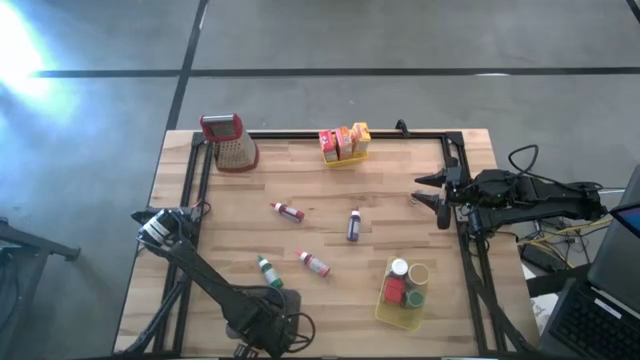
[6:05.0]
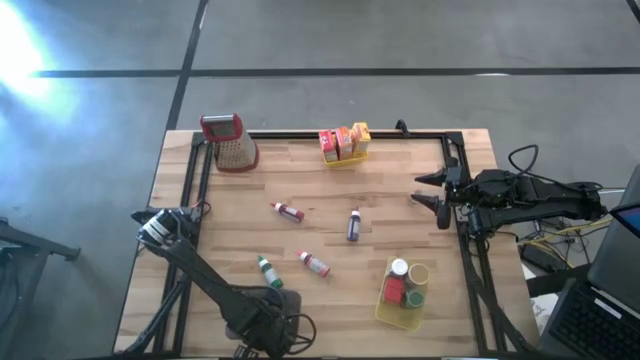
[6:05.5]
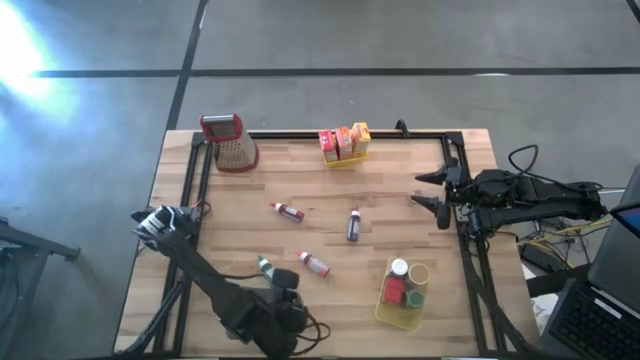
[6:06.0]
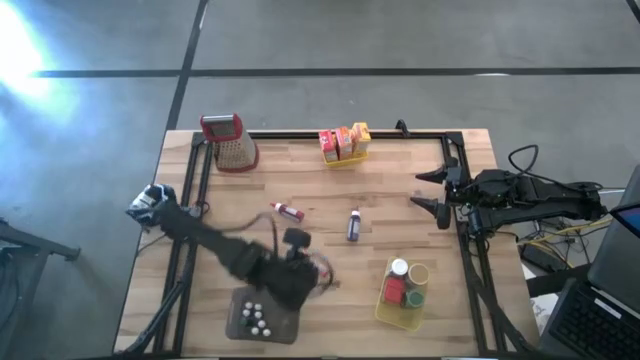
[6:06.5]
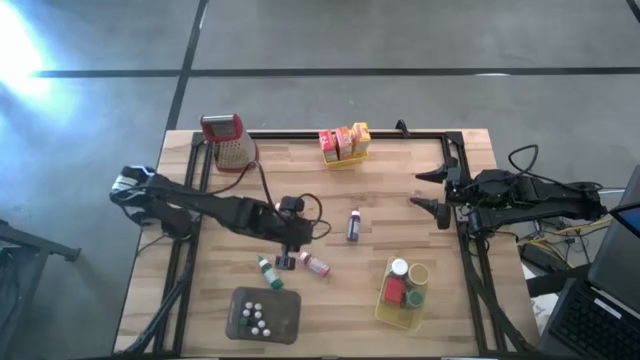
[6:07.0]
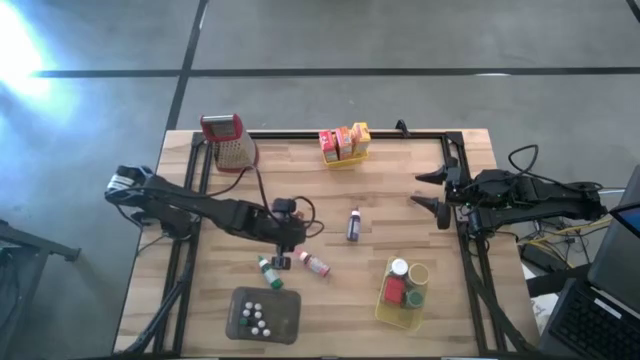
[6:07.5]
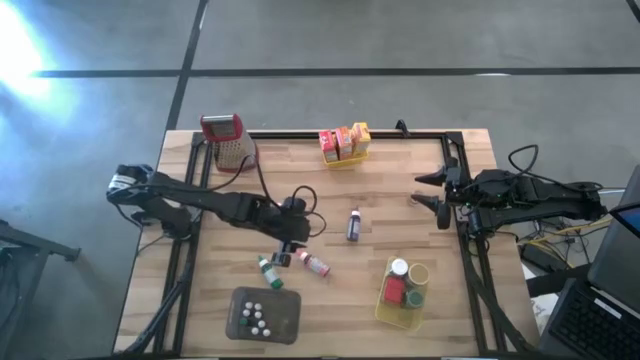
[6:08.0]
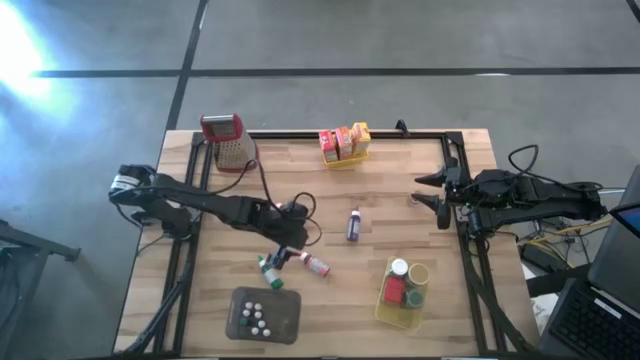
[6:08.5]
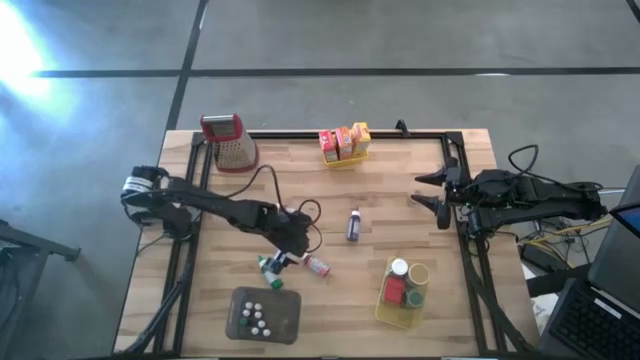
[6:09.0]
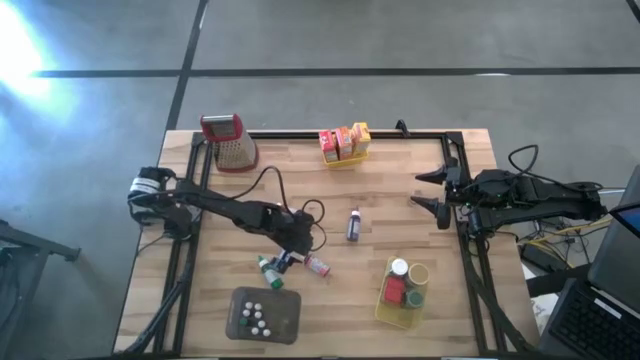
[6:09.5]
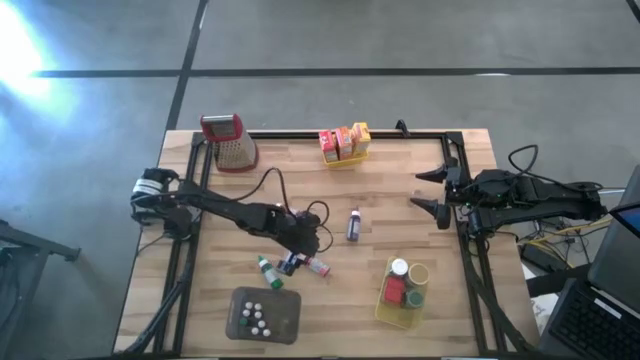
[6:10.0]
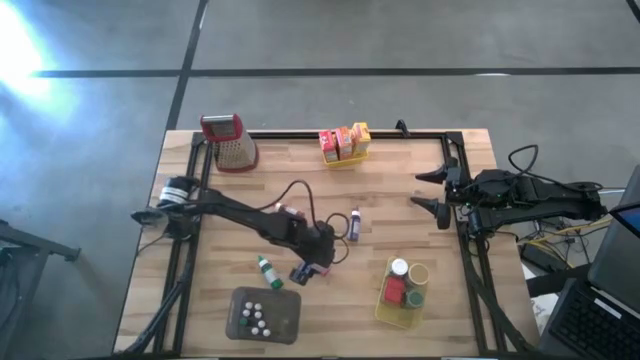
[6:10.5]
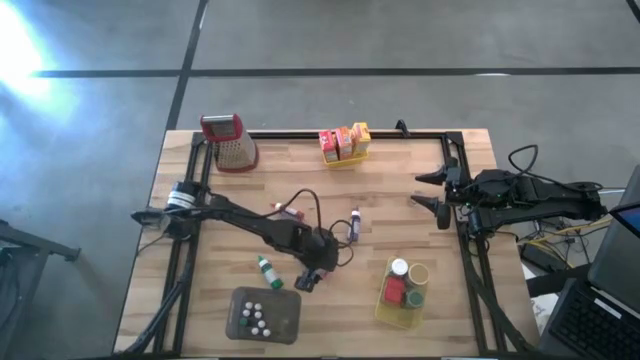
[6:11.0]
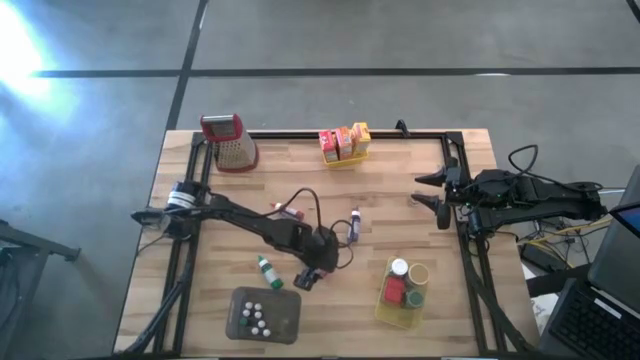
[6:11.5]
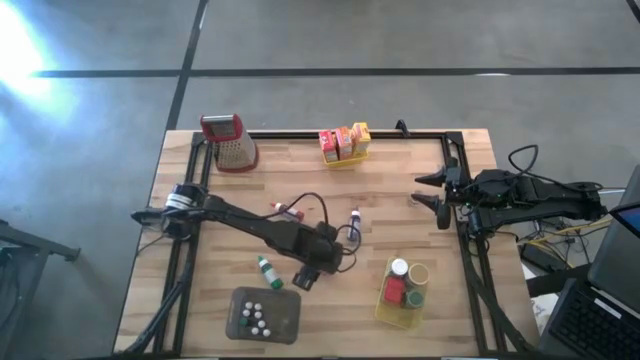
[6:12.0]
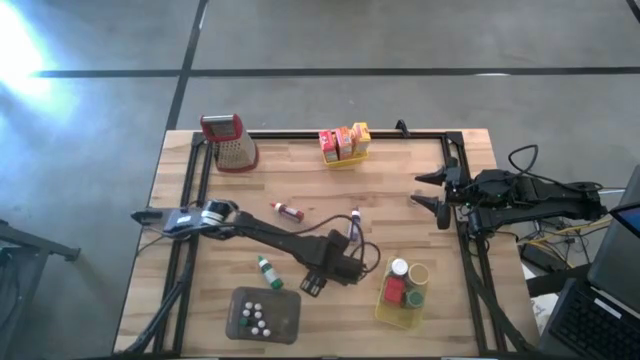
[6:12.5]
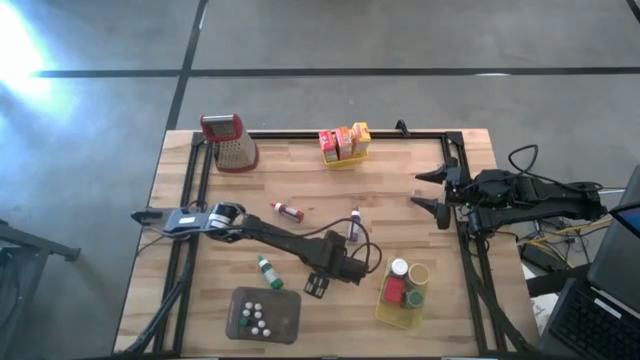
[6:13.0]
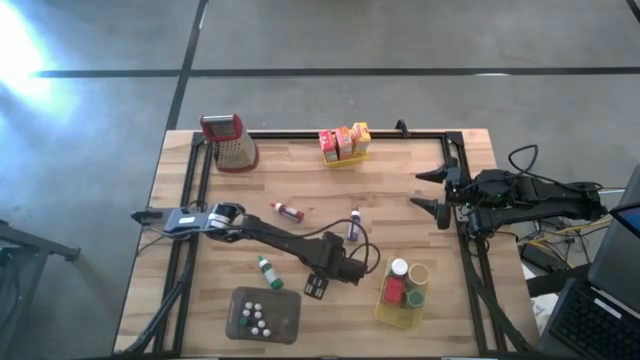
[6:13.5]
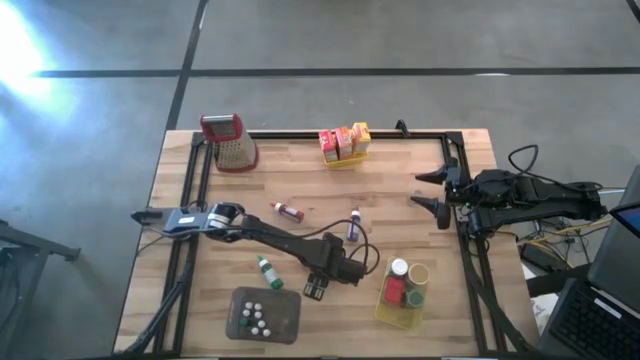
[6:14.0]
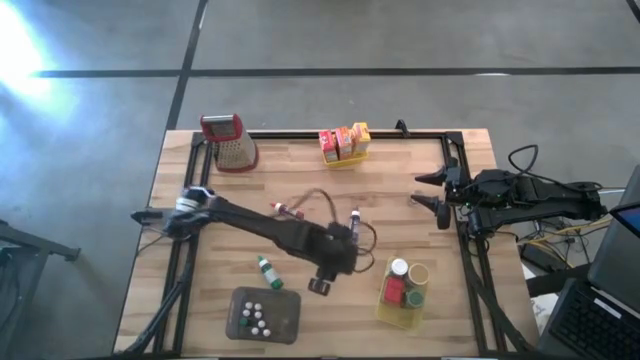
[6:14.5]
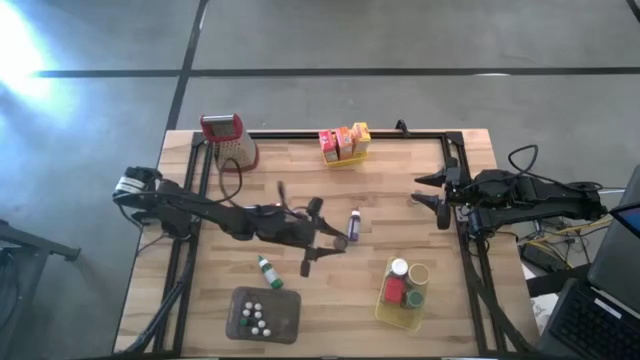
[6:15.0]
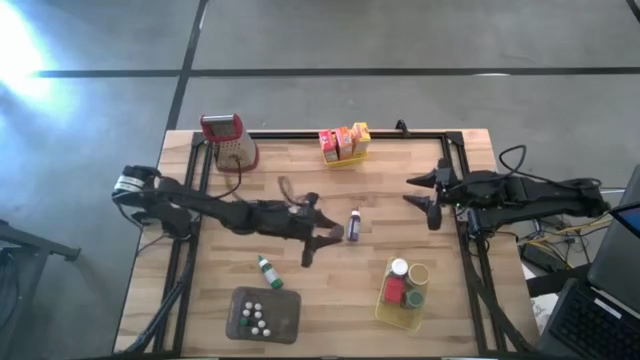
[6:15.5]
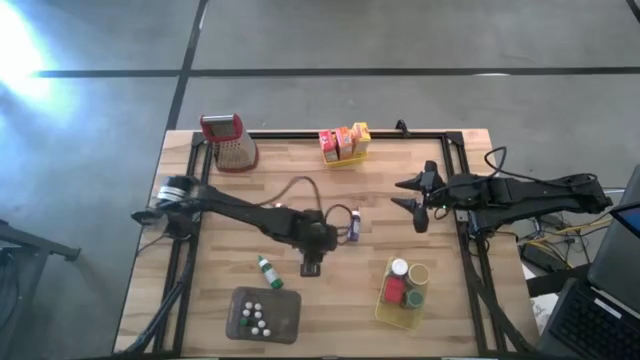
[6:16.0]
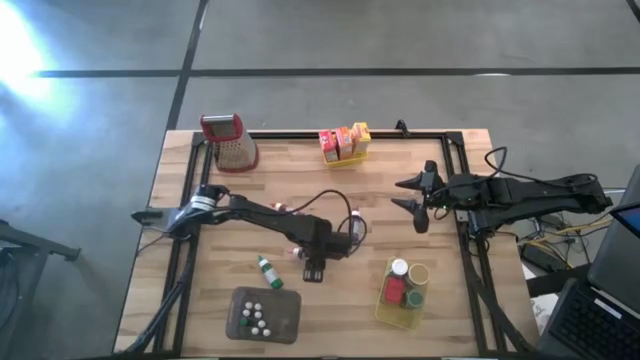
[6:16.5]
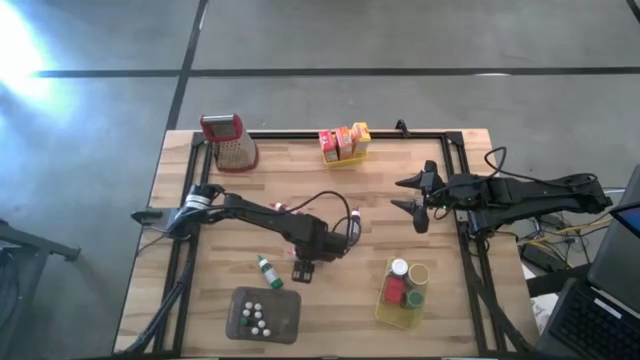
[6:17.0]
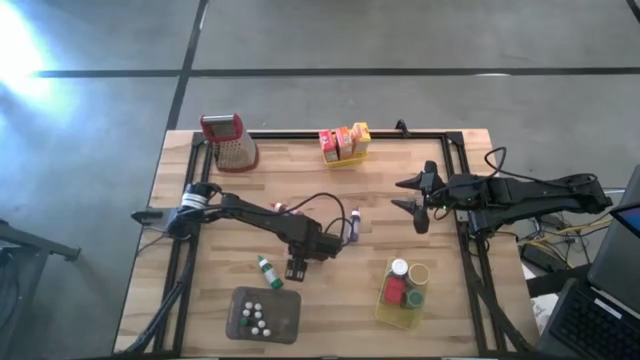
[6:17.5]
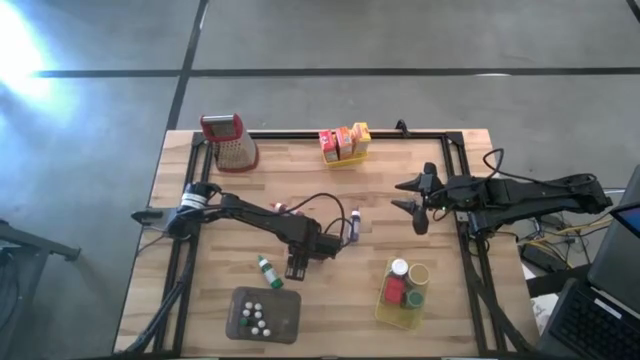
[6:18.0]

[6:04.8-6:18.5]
Task: Pick & Place Kitchen Items
Put the large pink food coloring bottle into the black bin

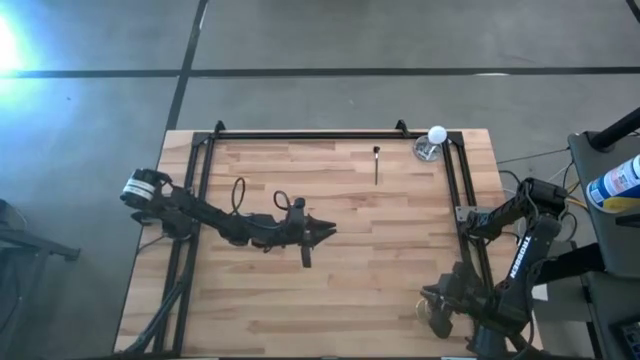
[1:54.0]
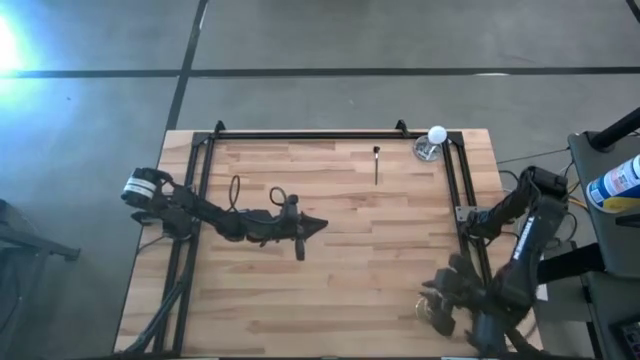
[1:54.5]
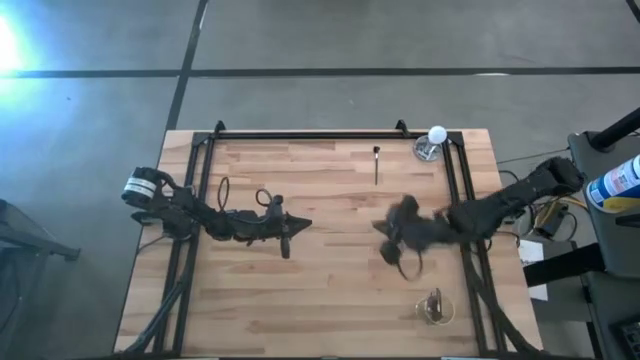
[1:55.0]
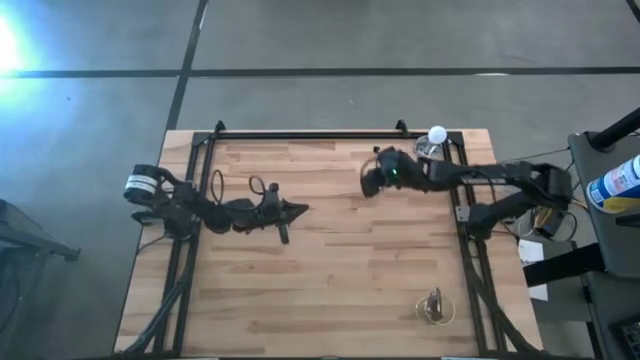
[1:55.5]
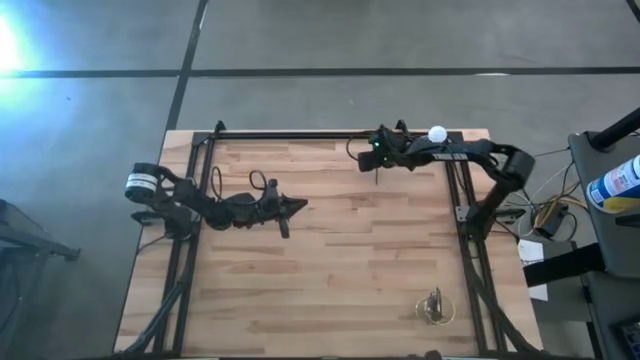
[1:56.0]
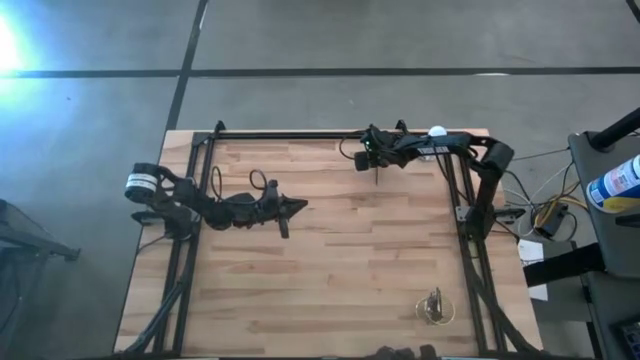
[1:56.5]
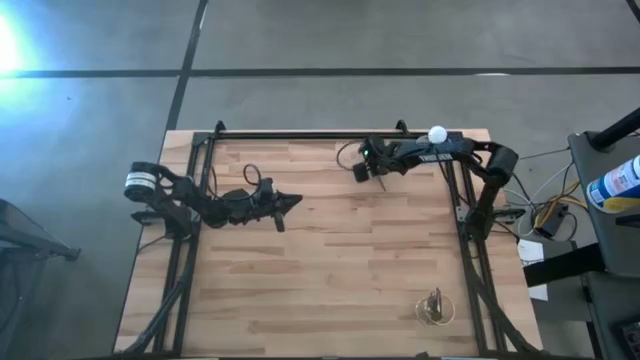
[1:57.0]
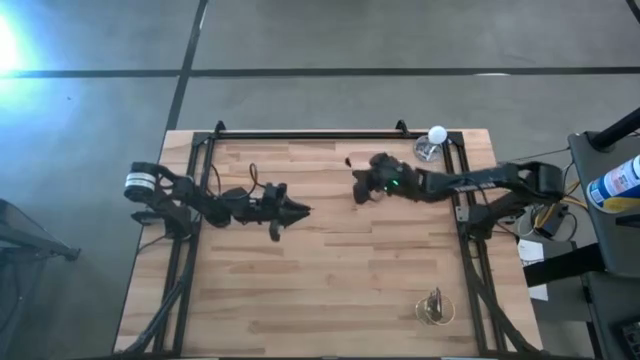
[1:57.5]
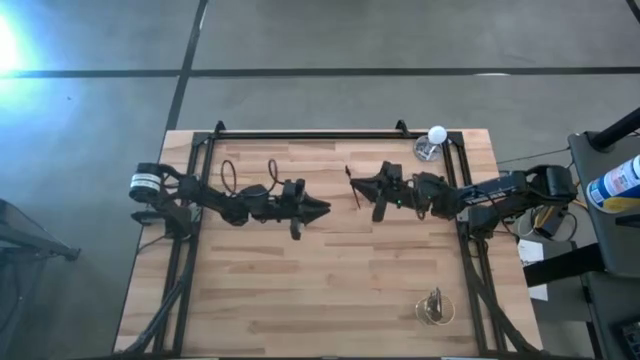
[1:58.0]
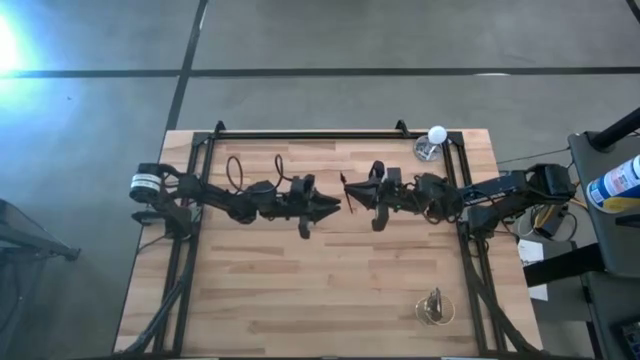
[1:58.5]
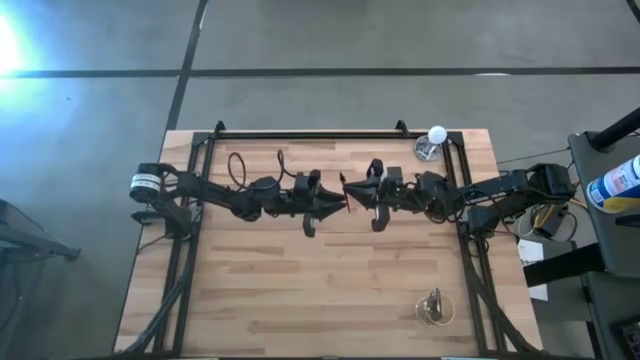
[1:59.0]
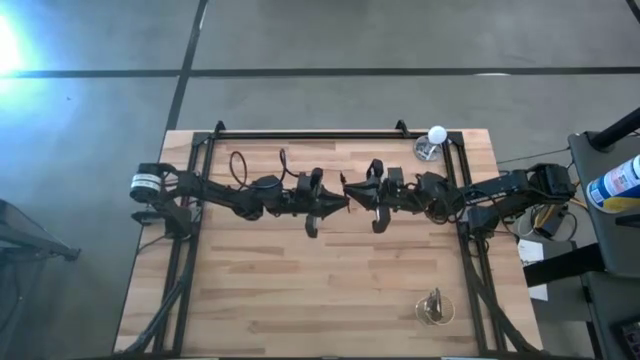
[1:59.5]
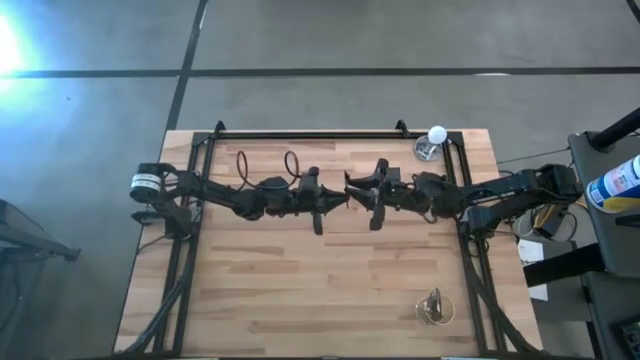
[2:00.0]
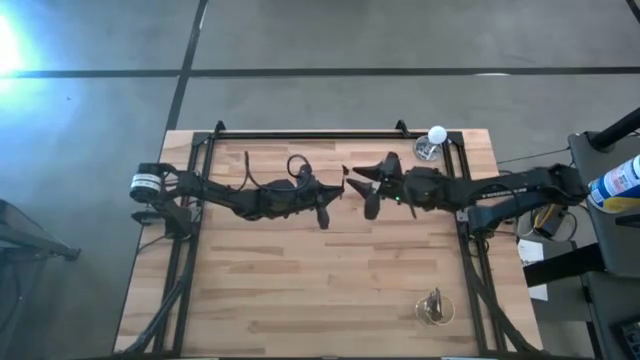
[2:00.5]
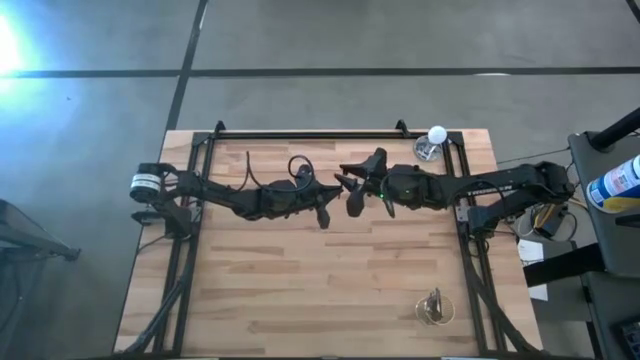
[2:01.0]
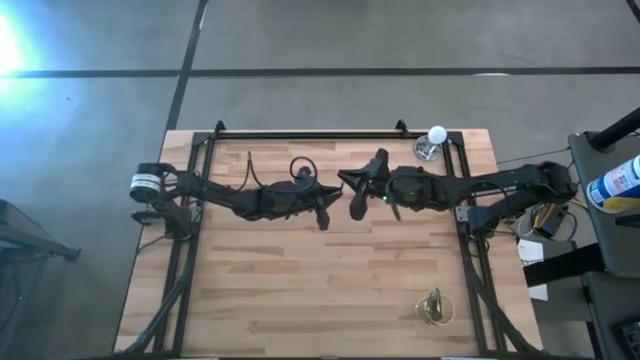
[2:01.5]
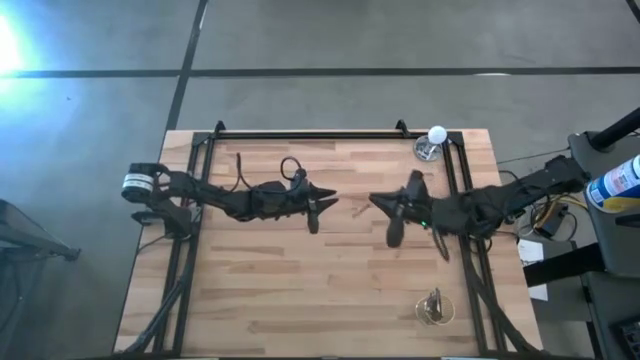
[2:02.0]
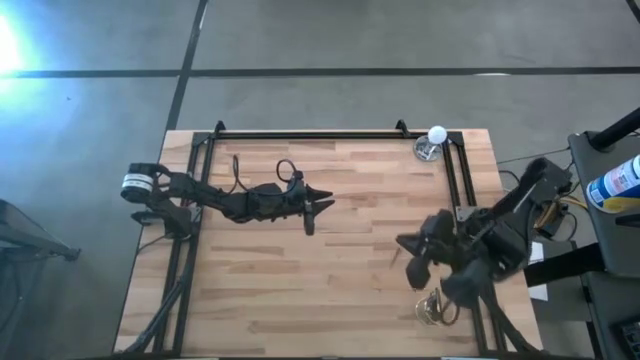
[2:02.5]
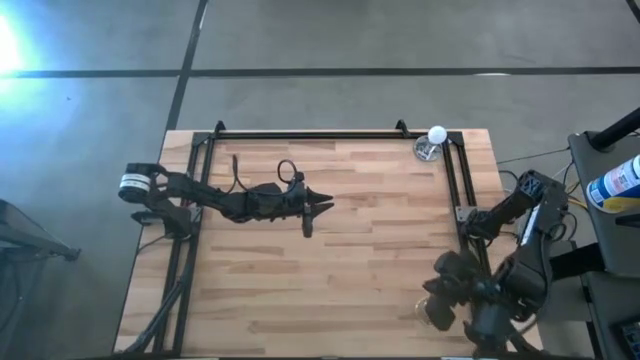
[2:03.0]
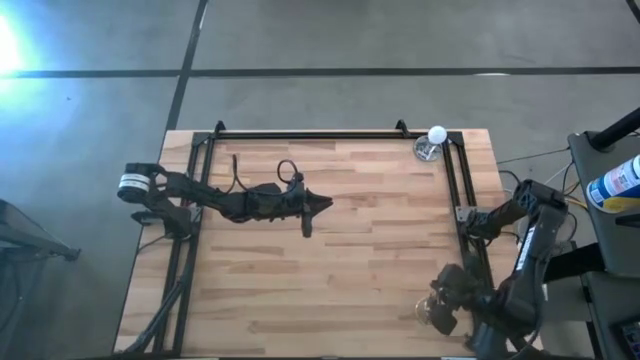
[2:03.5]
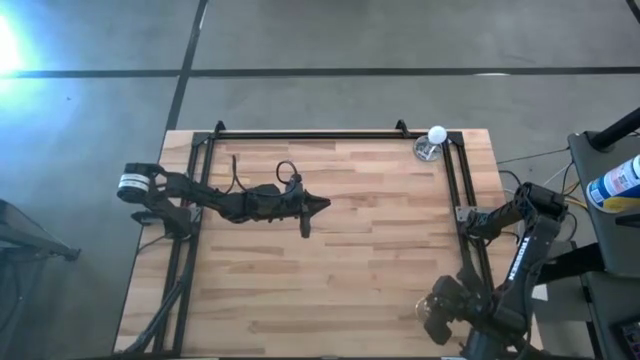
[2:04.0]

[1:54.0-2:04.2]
Task: Pick & Place Makeup Brushes
Put the eyebrow brush into the makeup brush holder
